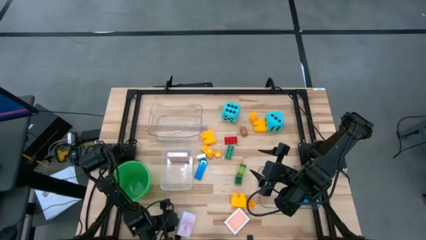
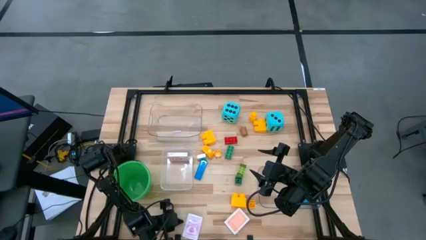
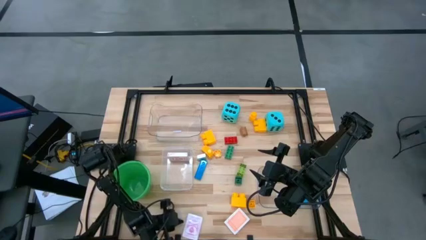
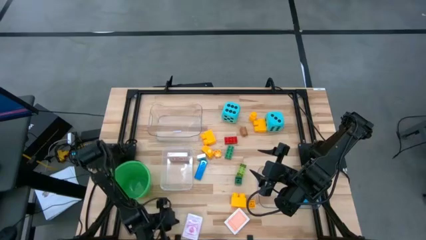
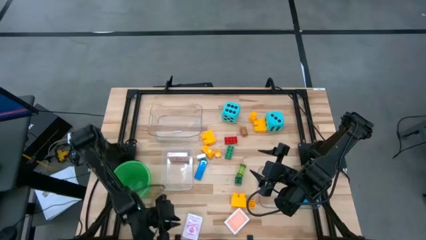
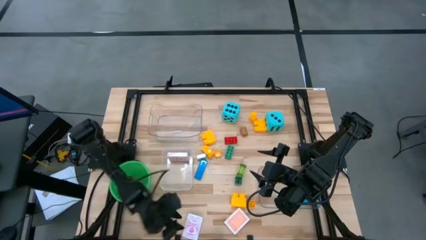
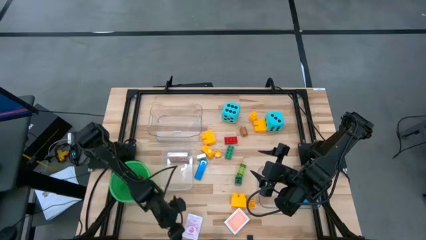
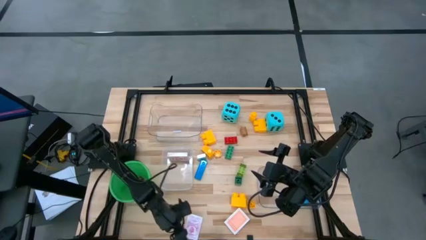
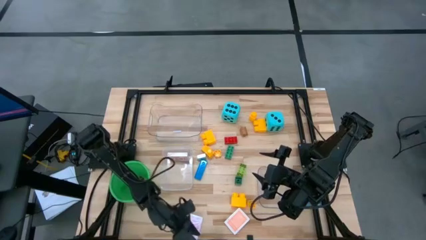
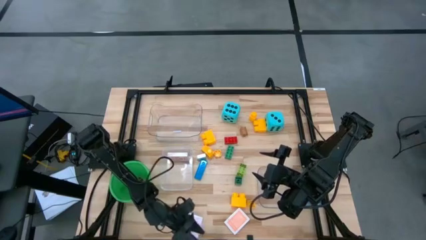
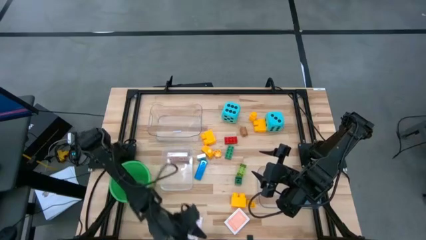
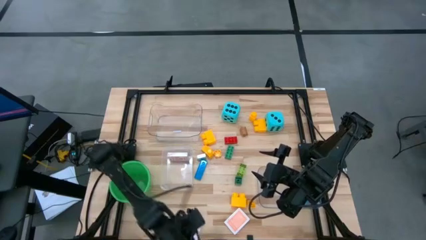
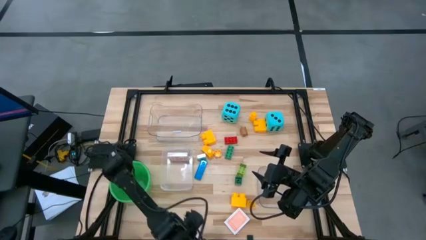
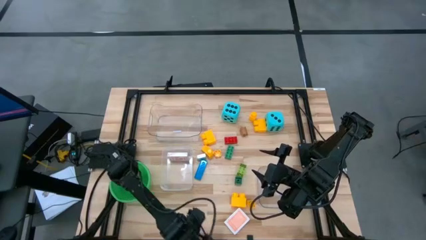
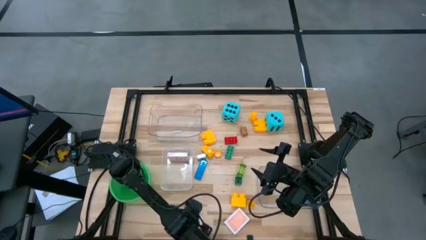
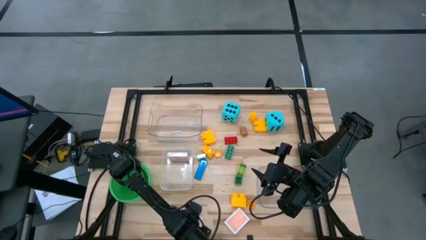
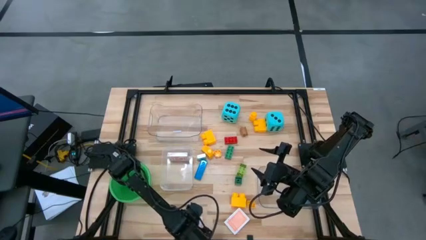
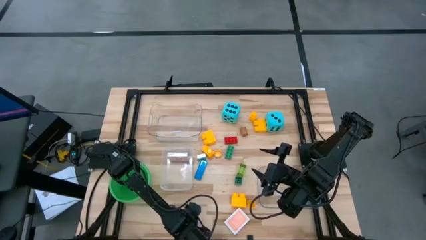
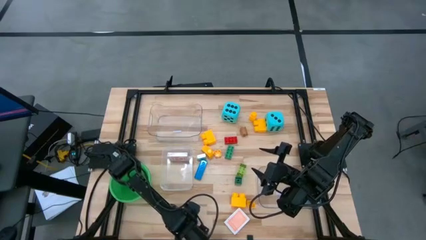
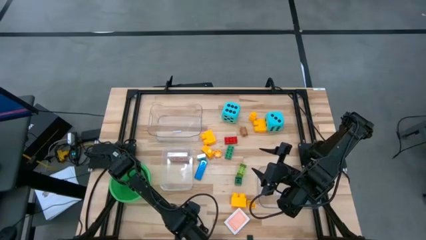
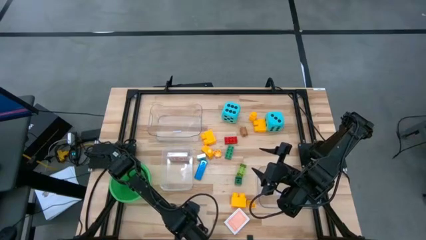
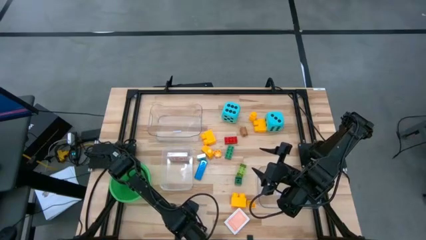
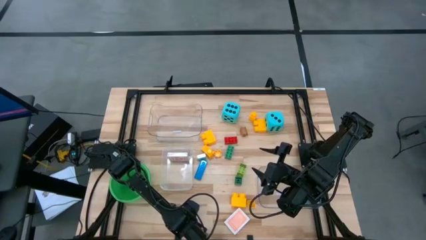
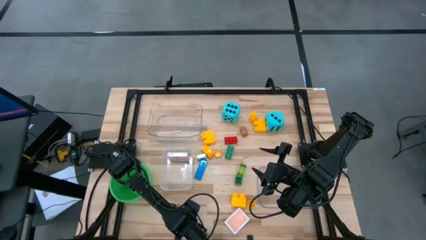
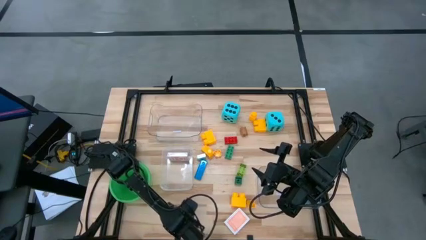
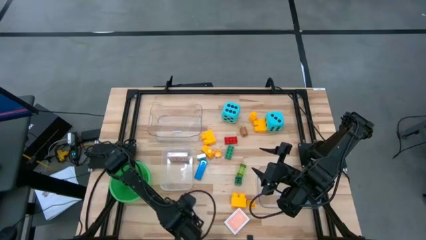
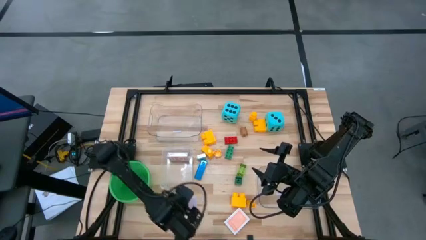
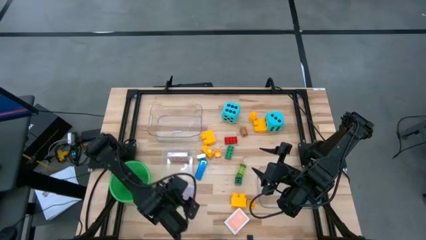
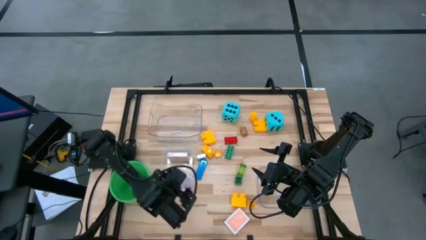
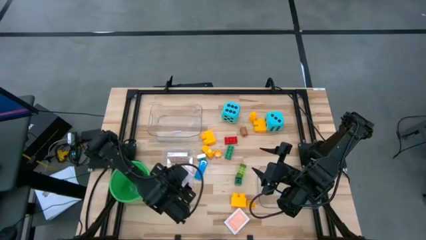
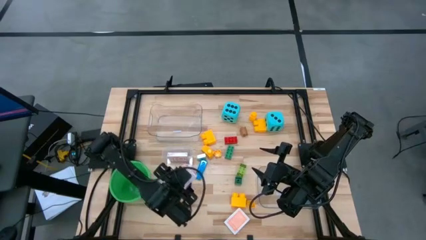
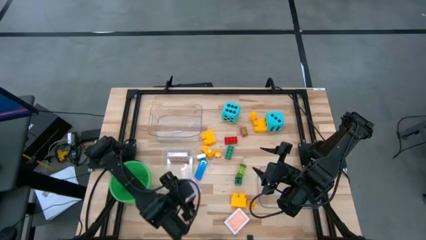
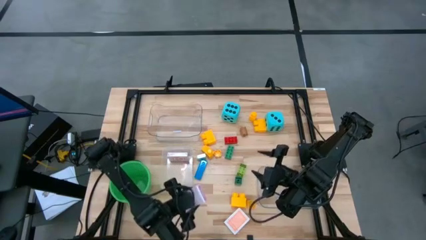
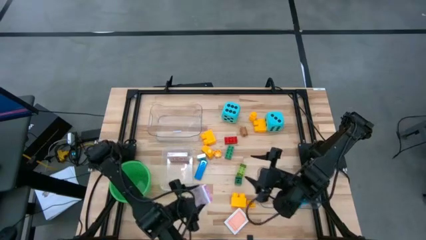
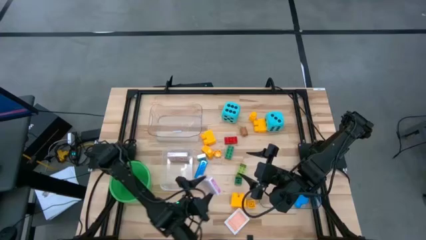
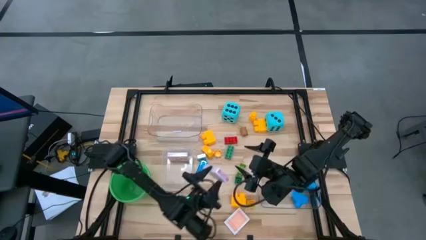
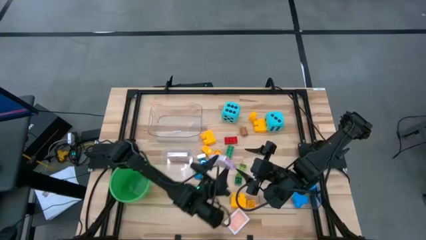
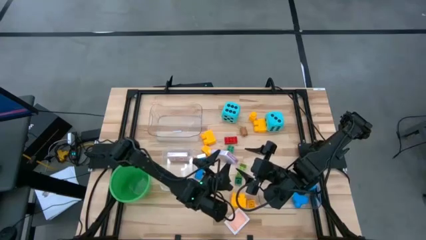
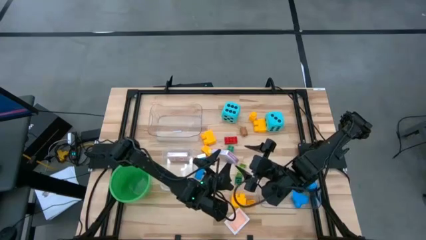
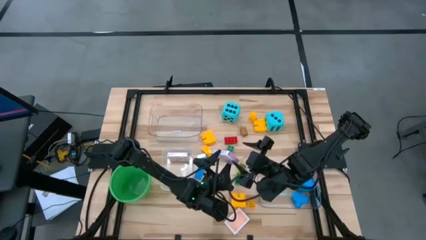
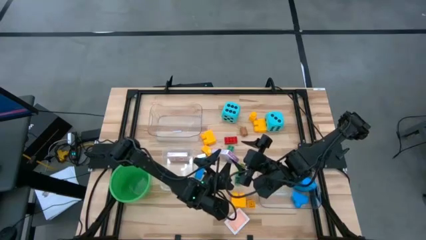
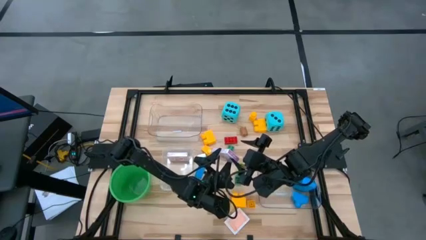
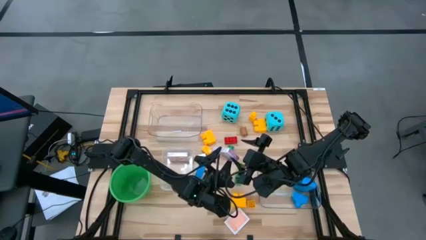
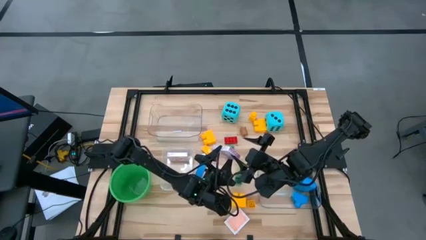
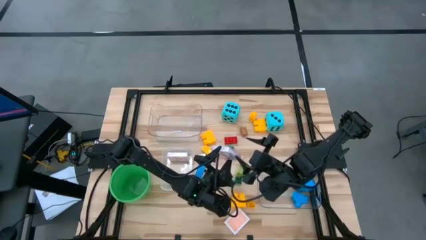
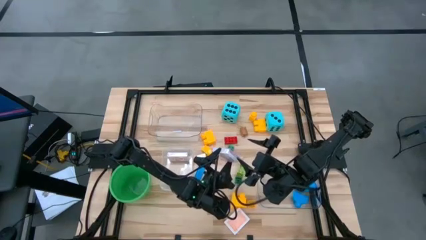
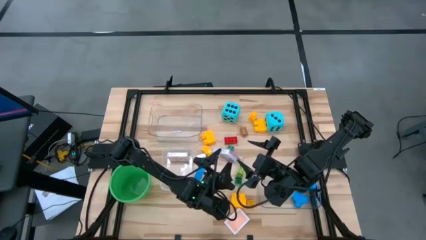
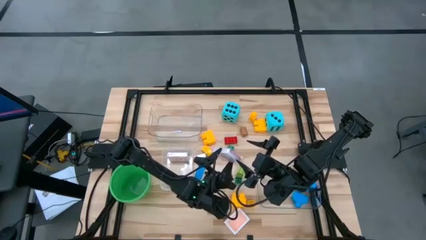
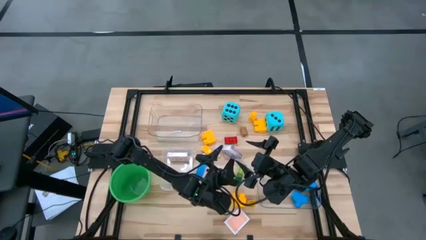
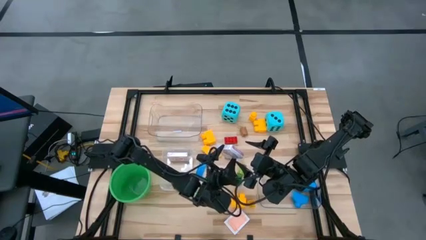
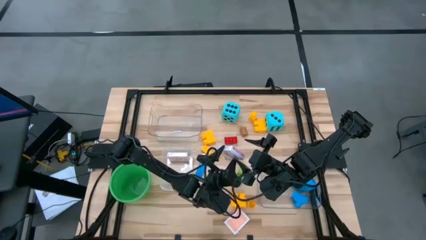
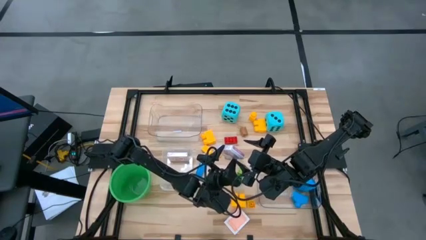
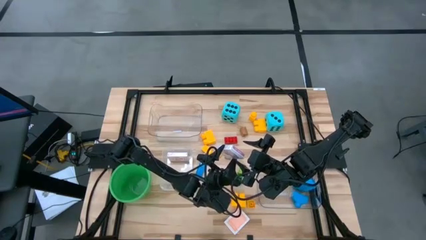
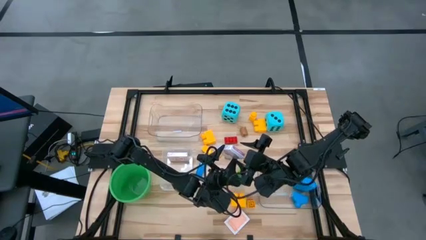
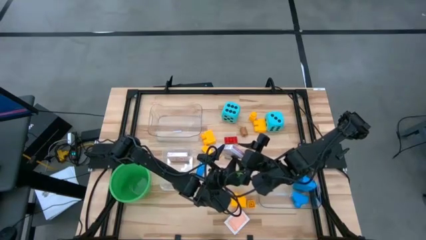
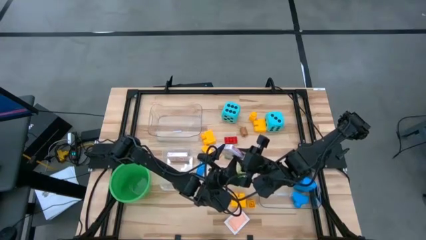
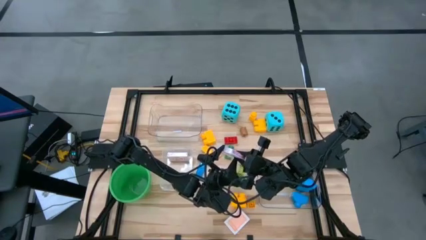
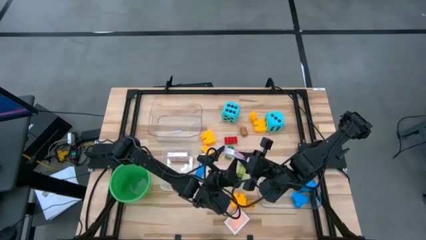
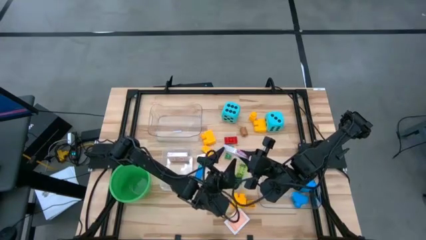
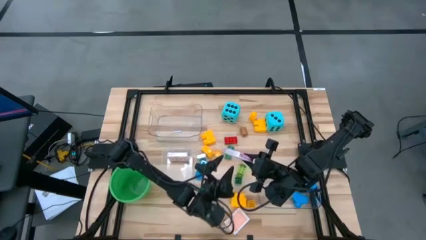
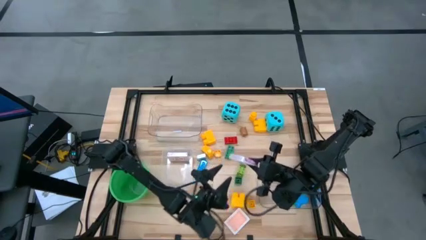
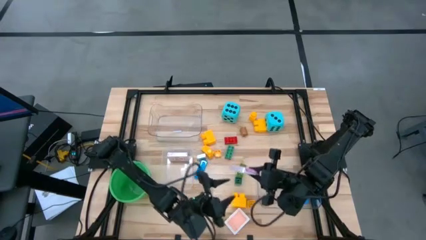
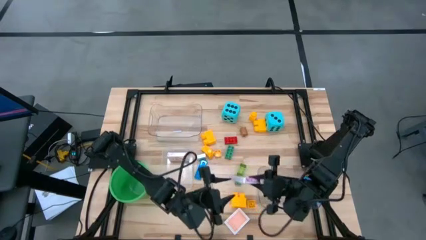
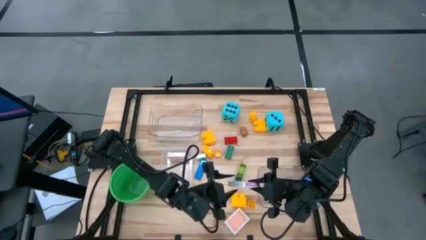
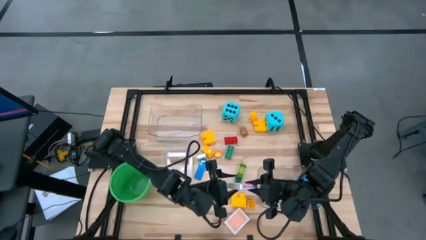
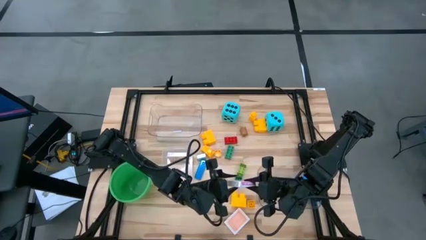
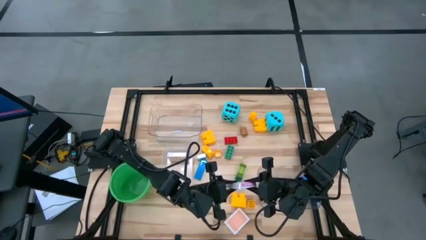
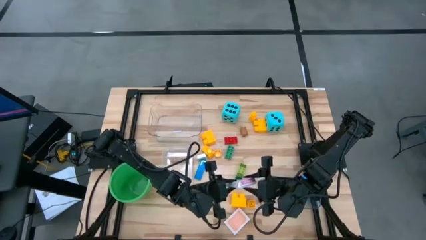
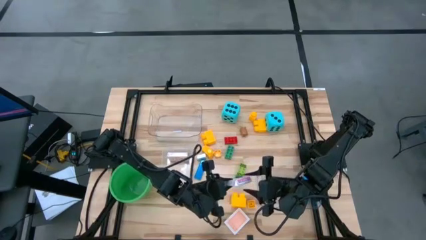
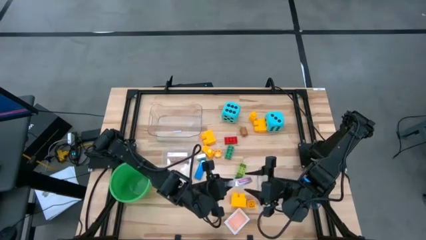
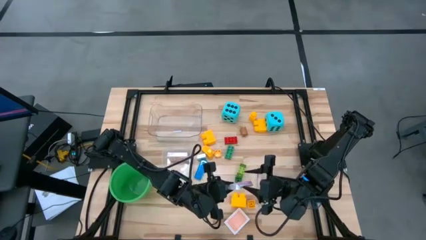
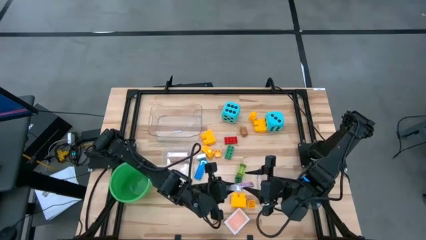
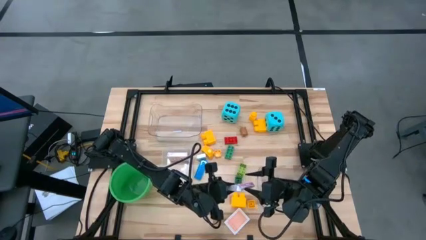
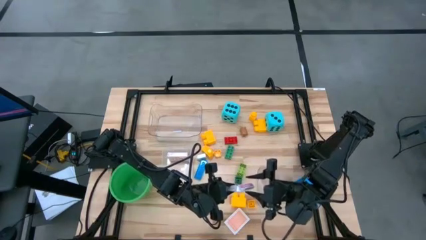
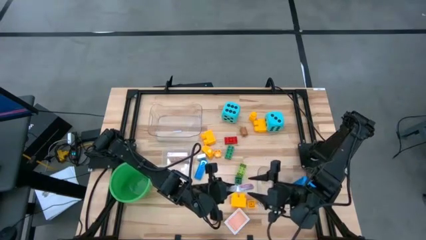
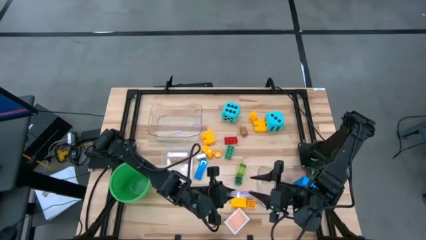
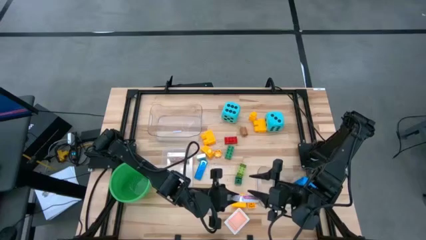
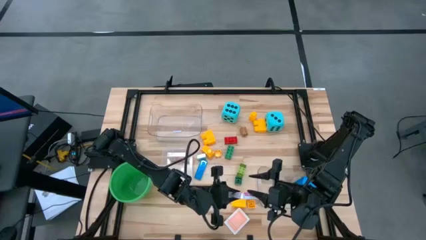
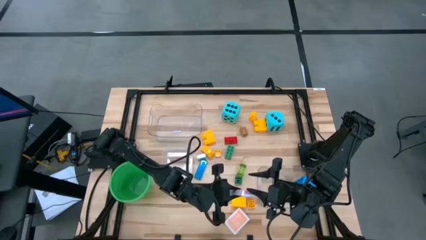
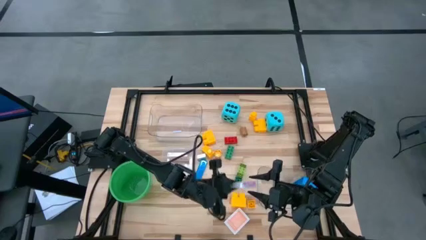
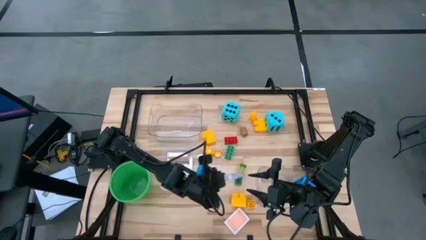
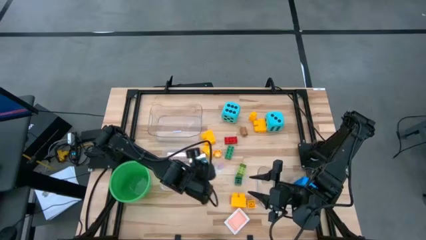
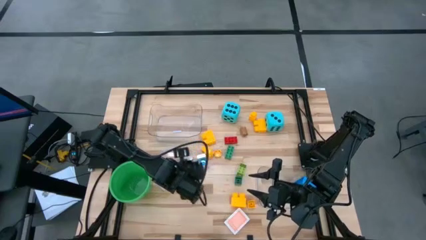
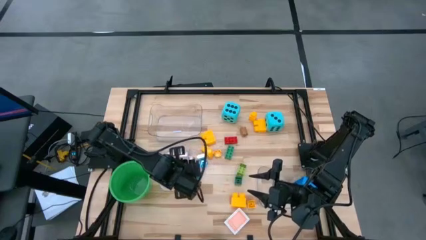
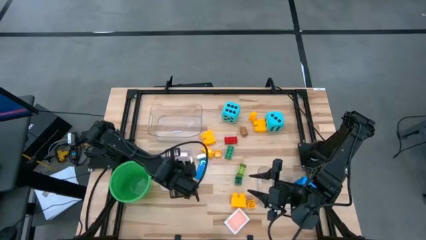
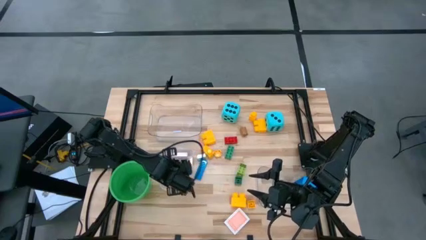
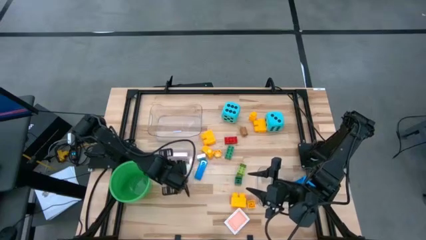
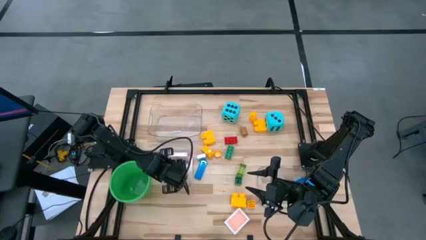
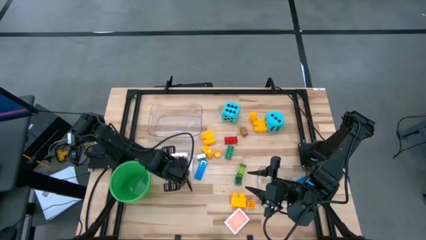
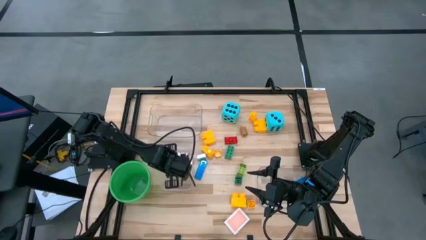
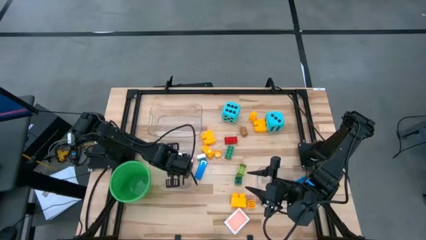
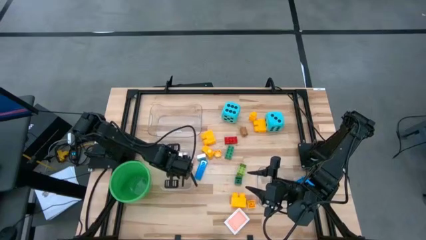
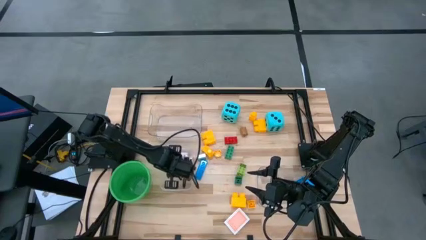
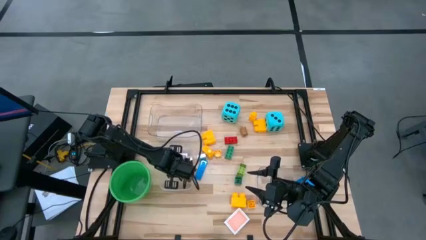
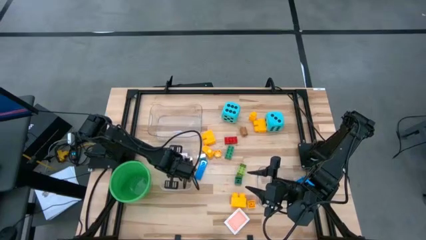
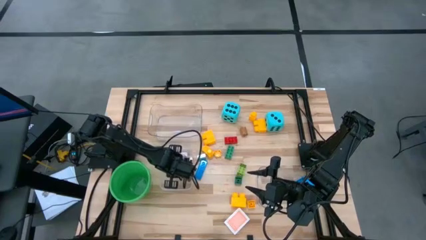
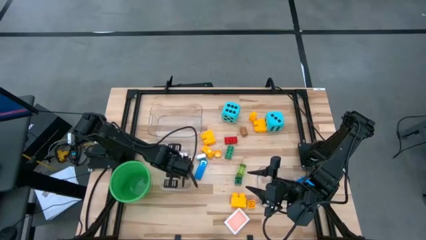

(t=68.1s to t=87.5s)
Task: Pick & Place Toys
Put the pink playing card box into the bottom left transparent bin
